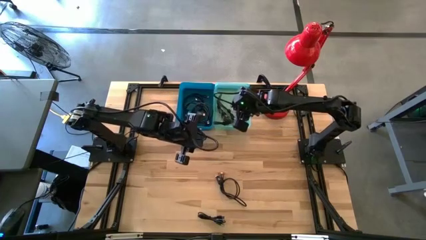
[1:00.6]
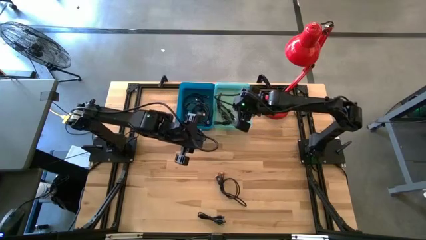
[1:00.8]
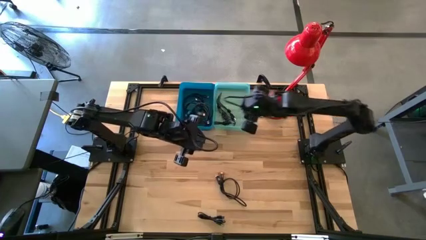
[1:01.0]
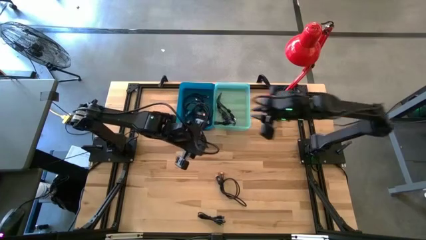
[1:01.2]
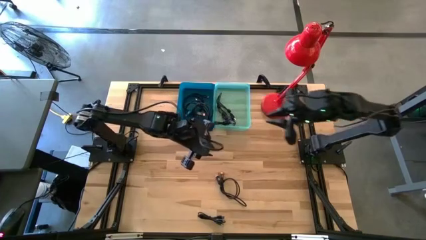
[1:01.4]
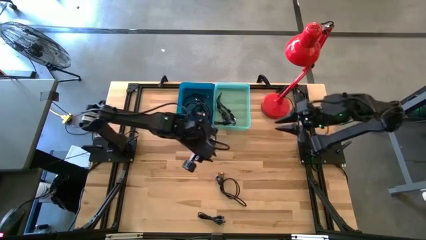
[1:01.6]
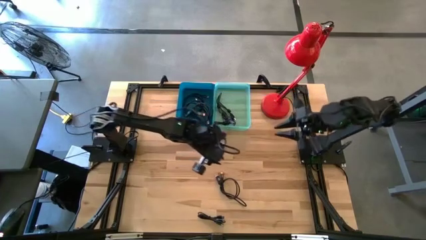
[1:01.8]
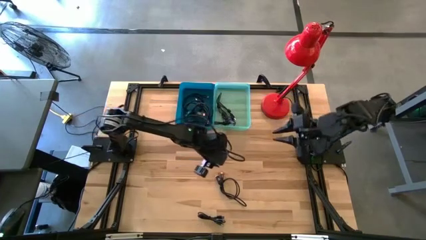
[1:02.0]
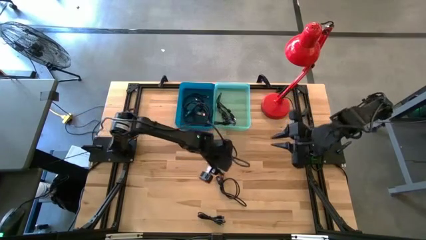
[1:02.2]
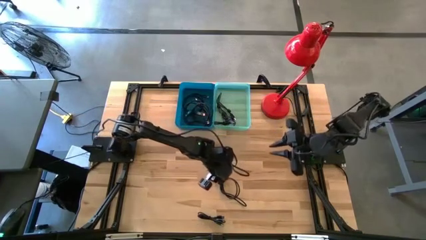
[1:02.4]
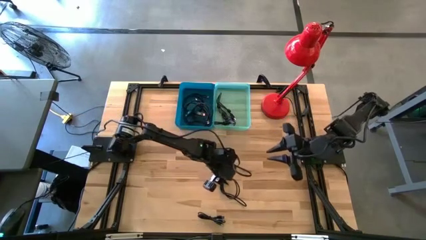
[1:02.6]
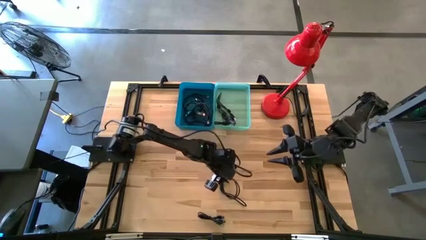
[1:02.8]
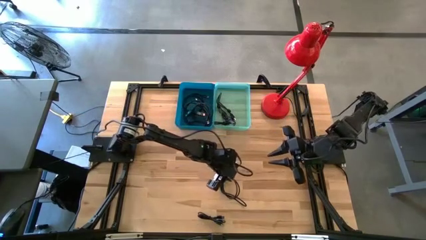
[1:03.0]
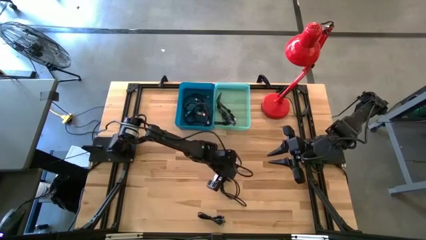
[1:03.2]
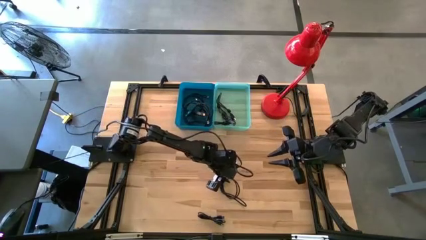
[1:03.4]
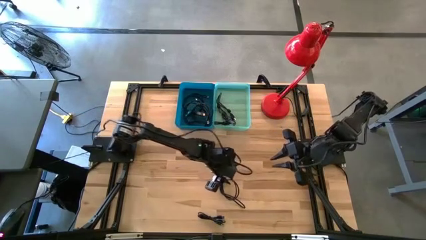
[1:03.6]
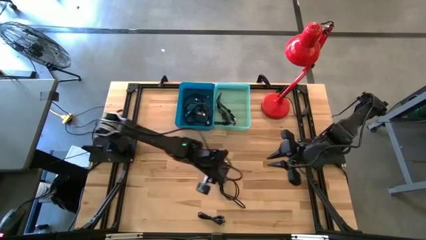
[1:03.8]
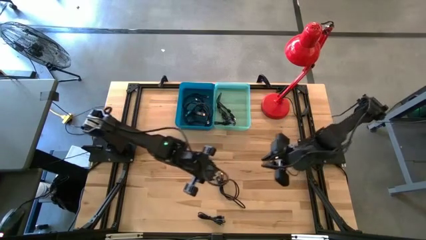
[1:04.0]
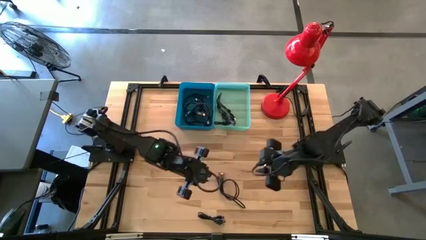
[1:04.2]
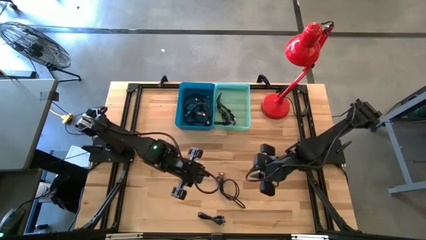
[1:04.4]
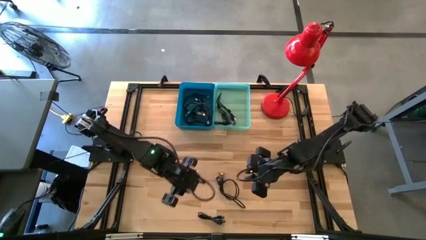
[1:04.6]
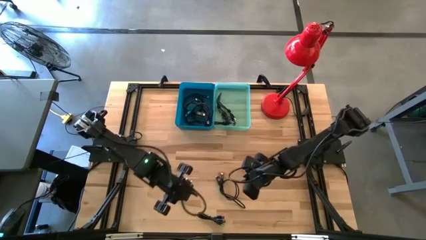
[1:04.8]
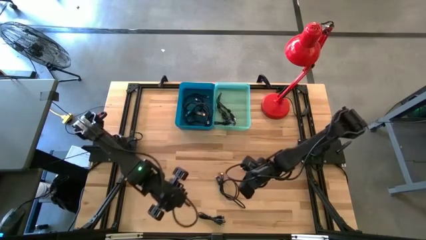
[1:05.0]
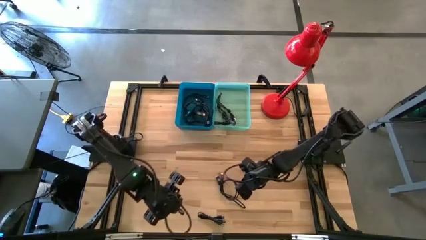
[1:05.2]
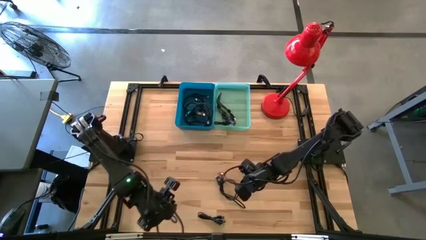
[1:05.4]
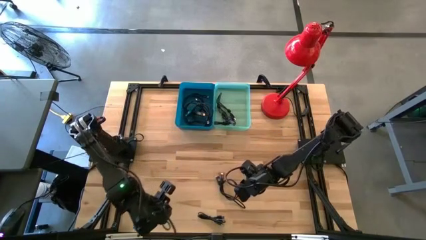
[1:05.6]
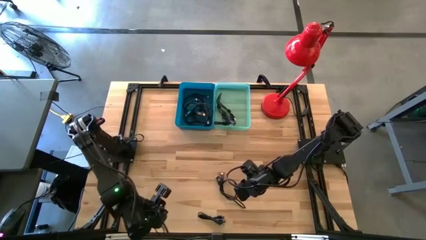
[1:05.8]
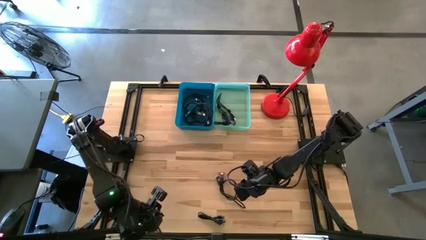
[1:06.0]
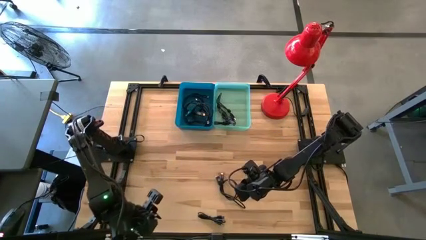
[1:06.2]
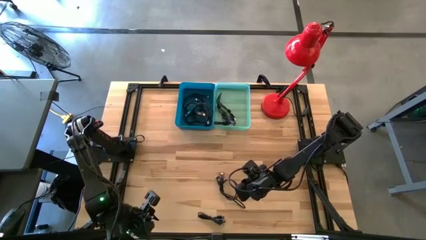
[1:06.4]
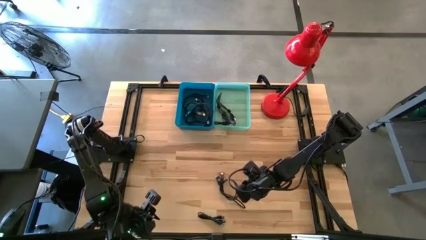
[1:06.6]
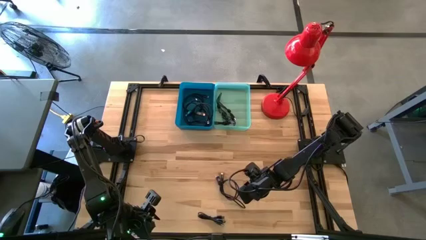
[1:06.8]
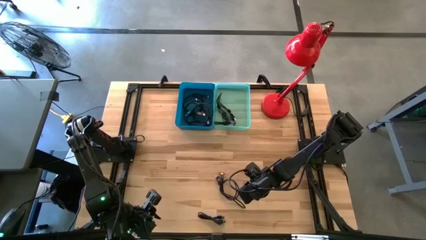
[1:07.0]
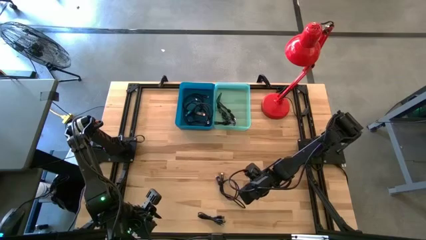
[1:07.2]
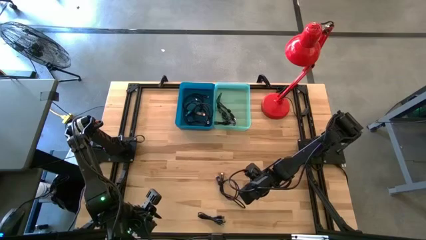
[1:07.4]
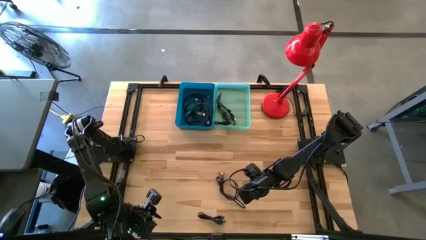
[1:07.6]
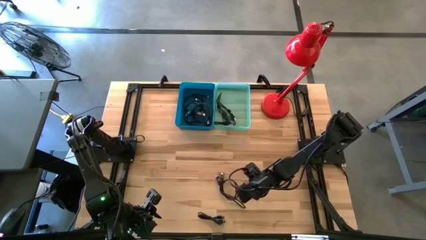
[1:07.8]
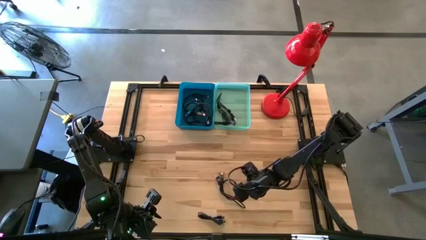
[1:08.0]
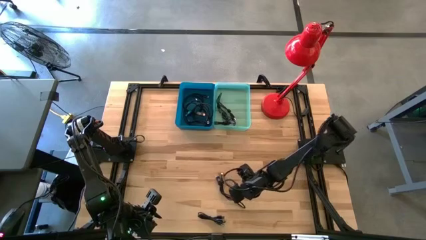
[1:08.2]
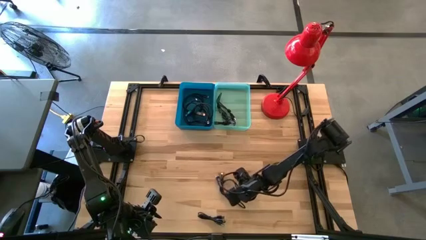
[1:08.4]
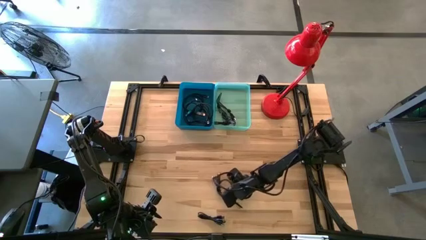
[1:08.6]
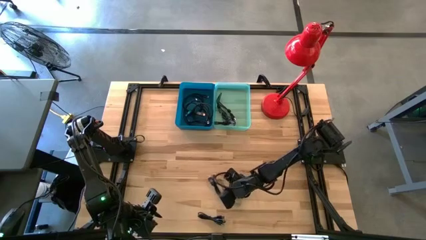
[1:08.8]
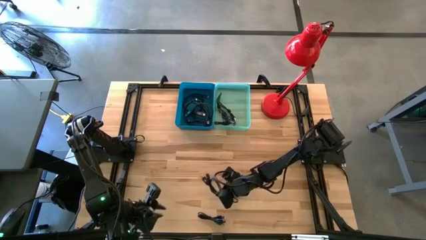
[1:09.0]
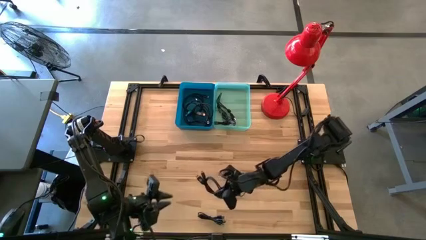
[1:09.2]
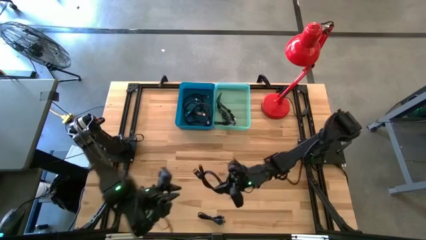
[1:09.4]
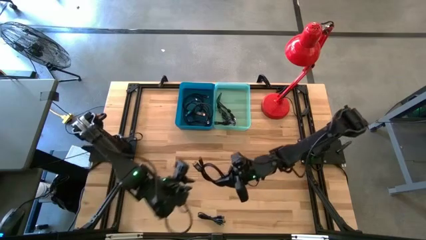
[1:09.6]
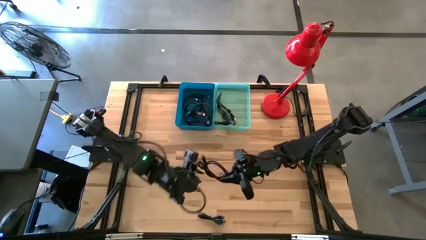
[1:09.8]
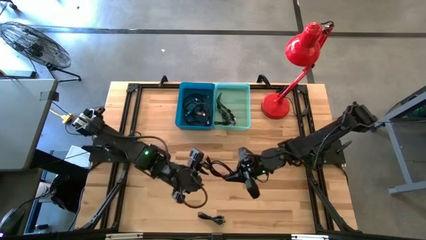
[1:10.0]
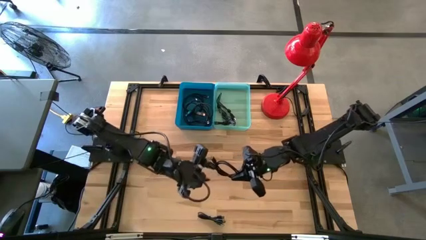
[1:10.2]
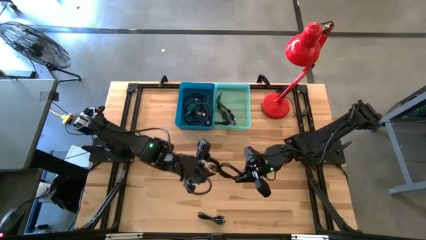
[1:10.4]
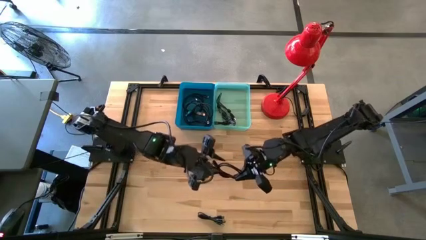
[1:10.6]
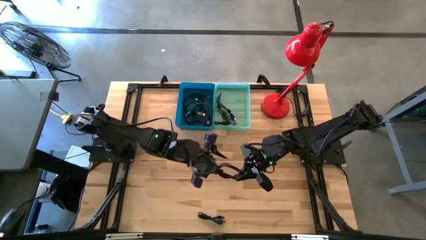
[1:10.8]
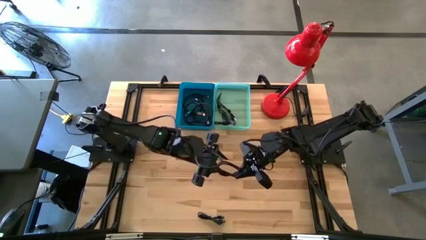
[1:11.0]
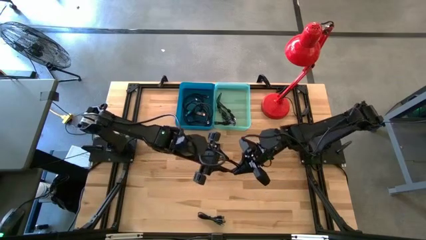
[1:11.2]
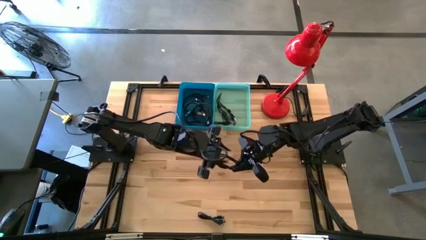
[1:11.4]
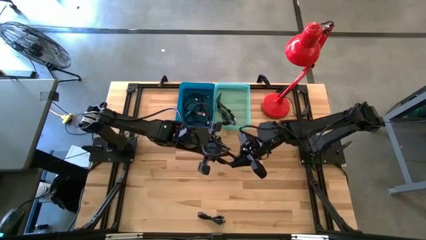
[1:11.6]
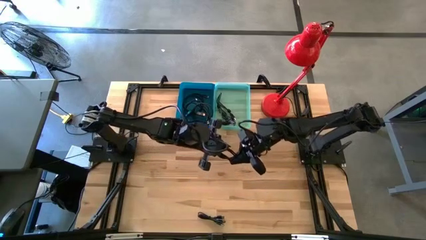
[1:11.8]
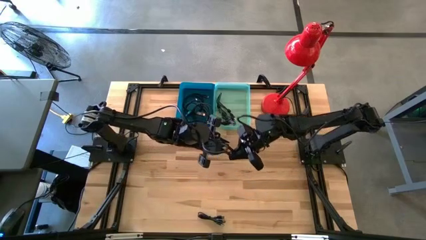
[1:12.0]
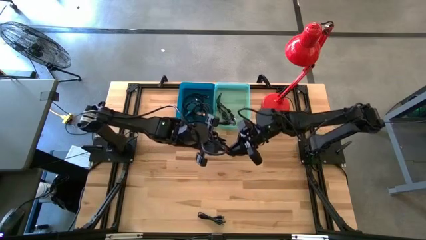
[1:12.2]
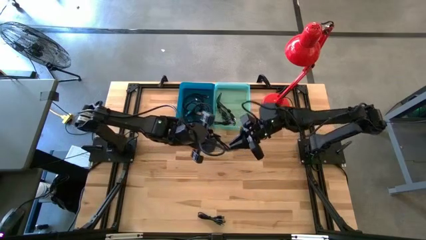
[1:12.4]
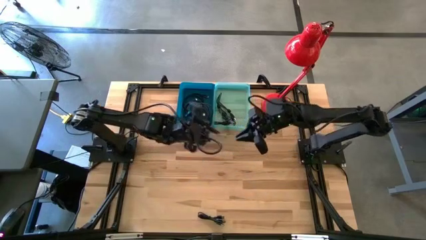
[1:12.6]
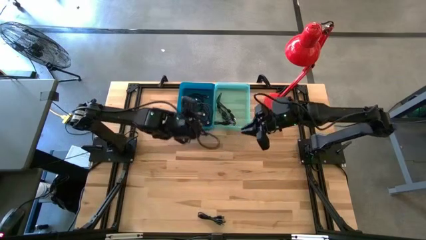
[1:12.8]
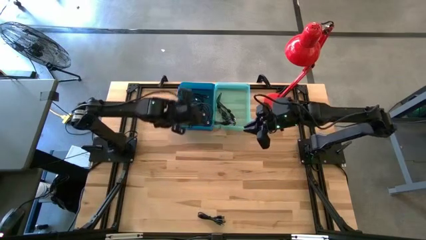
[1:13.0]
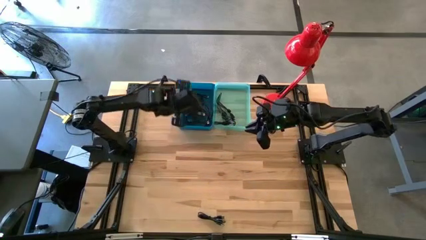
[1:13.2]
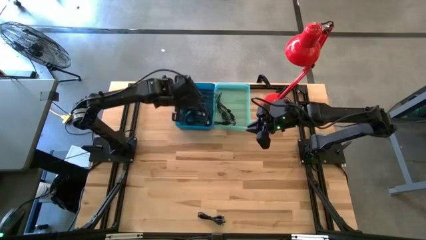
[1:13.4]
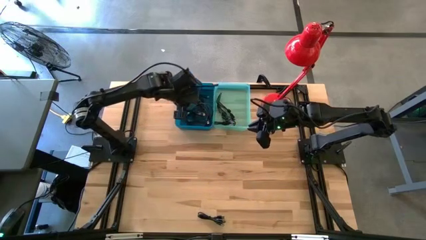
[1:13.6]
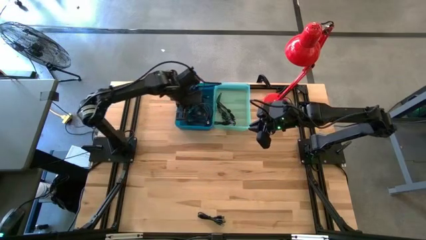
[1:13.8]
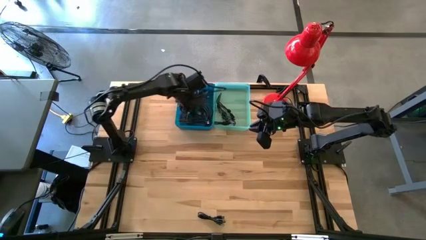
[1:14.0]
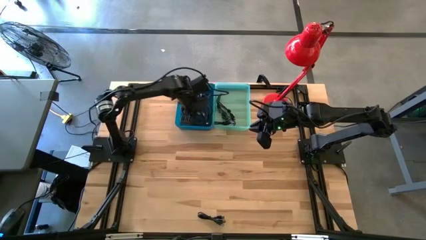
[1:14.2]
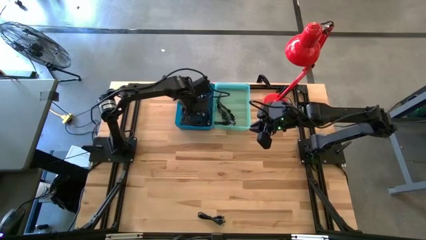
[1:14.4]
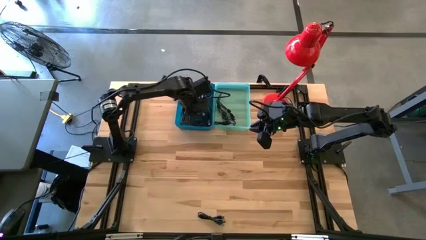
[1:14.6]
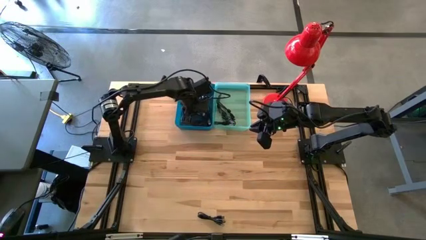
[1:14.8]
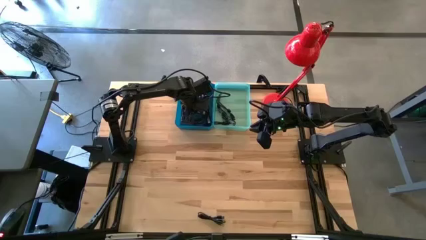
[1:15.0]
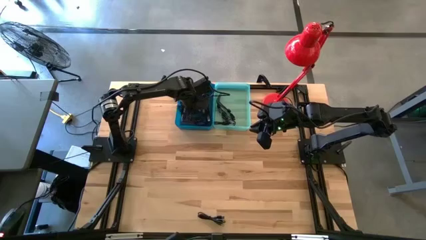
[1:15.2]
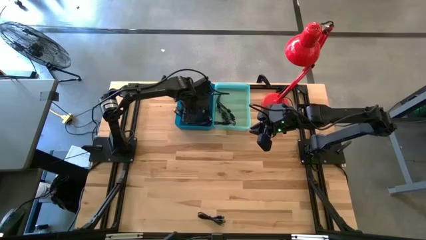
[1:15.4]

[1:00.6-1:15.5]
Task: Pick & Place USB Port
Put the black charger cable into the dark blue bin

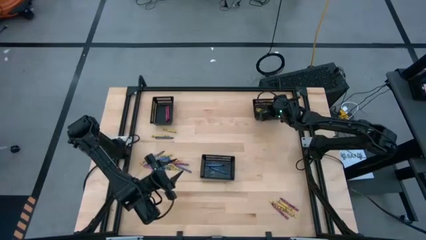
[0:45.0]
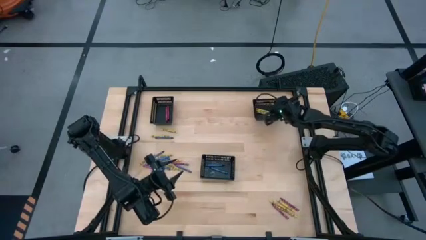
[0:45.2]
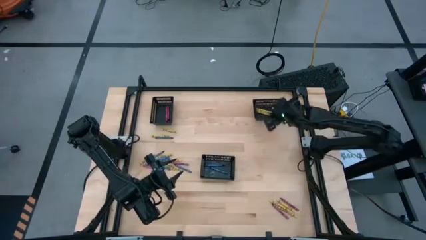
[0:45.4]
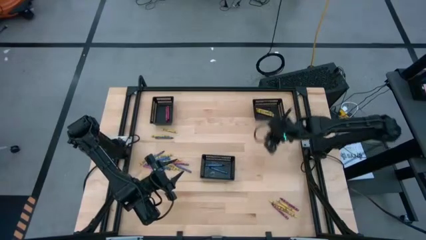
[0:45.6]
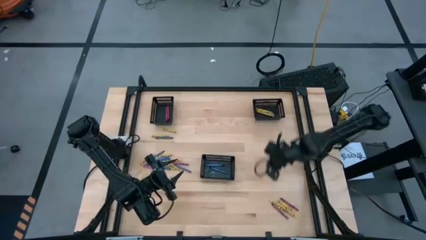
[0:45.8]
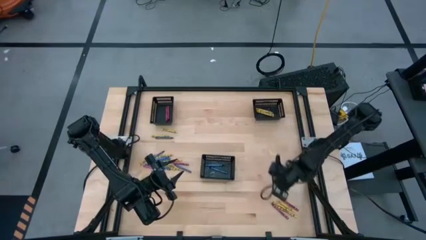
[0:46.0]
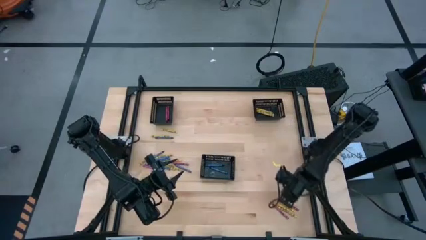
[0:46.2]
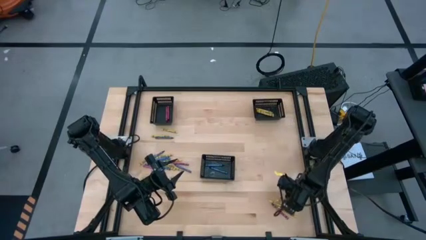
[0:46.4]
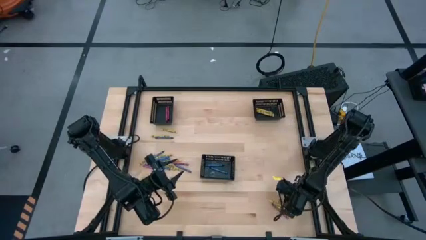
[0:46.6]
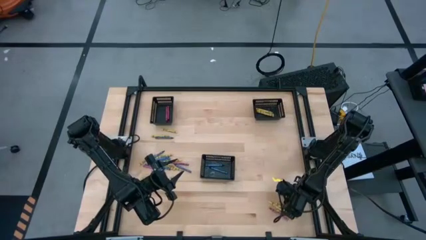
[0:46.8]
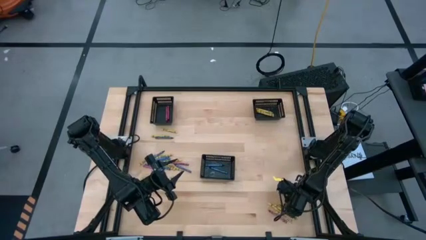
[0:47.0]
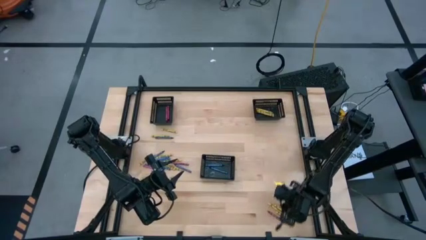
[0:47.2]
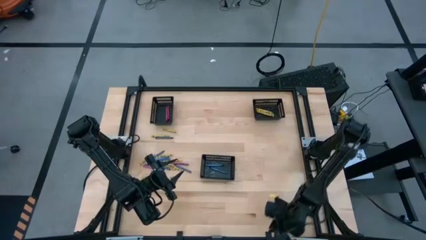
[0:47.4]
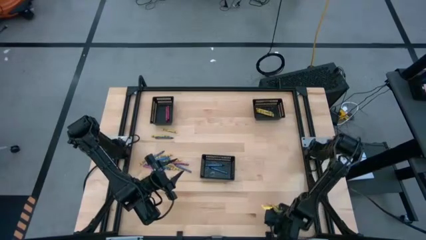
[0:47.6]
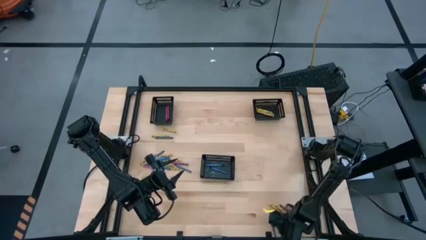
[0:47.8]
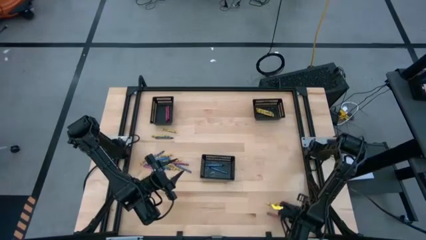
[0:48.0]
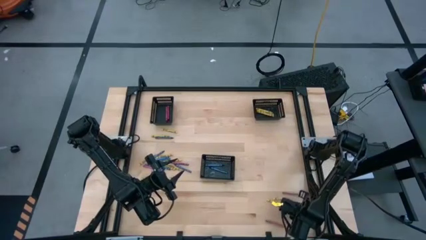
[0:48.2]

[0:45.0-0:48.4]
Task: Sort crayons
Adjust the crayons

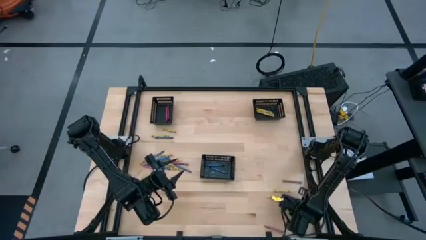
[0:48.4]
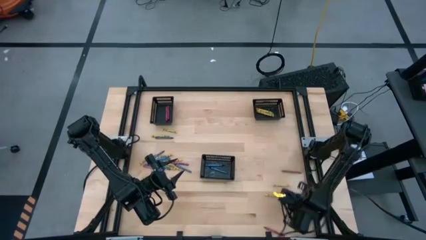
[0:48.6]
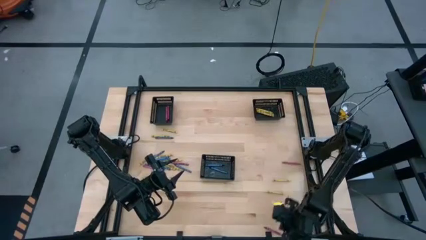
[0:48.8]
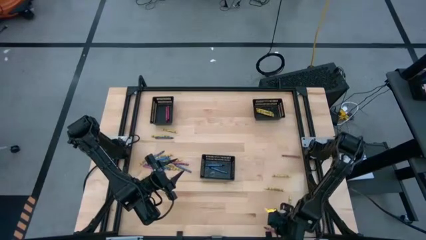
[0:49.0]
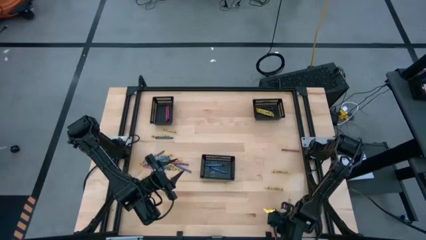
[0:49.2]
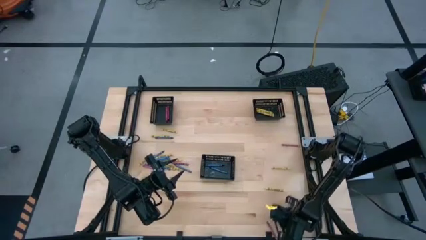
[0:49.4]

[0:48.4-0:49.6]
Put the pink crayon into the top left black bin
